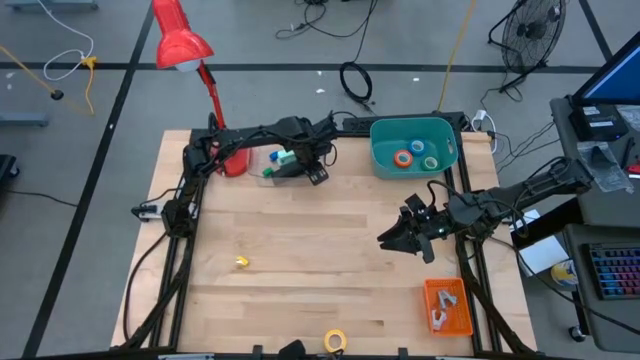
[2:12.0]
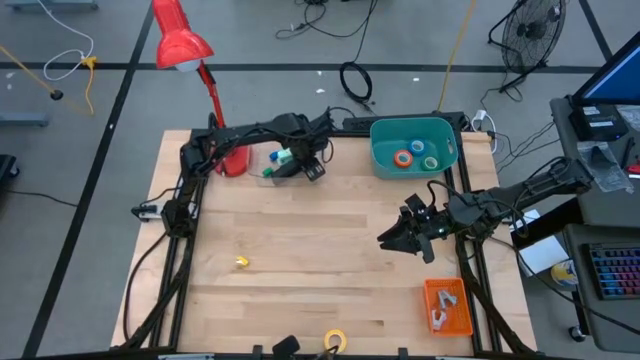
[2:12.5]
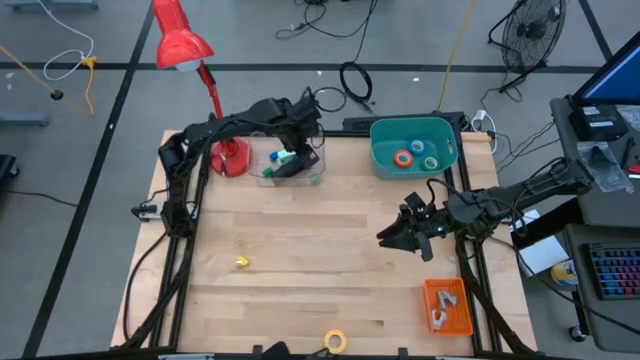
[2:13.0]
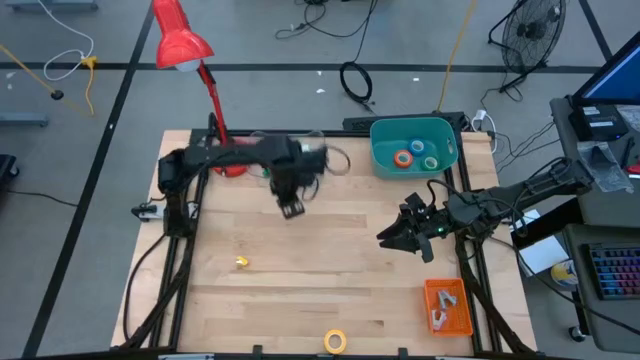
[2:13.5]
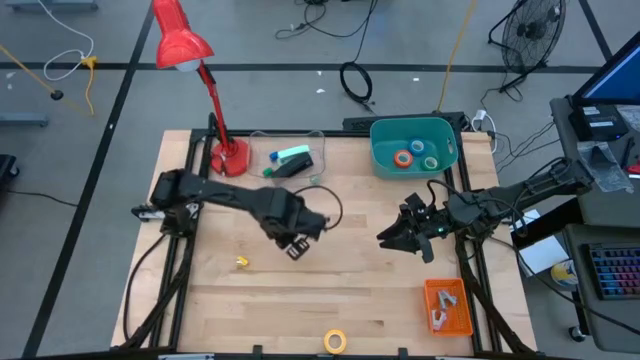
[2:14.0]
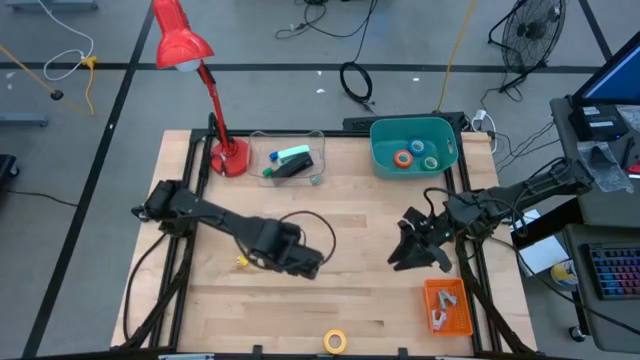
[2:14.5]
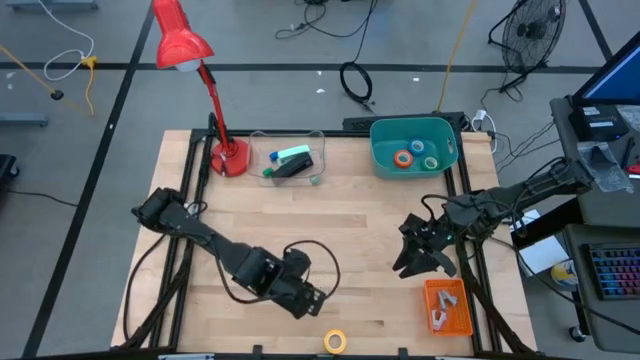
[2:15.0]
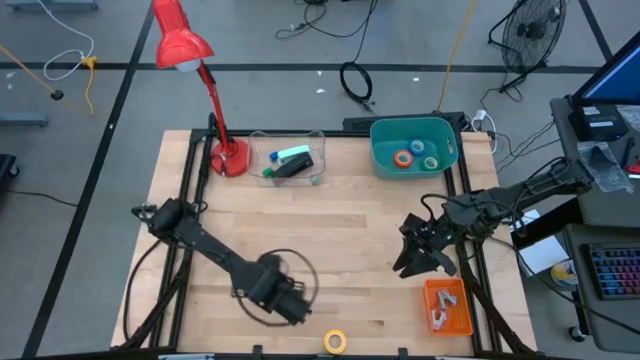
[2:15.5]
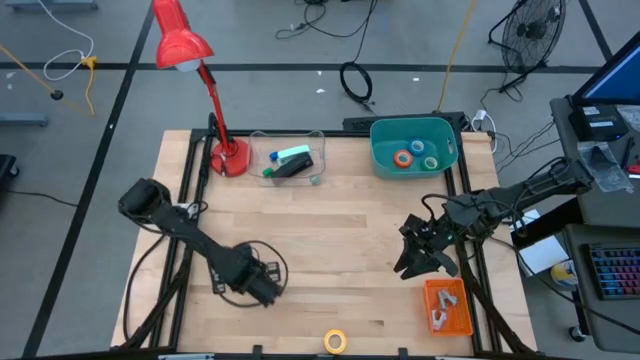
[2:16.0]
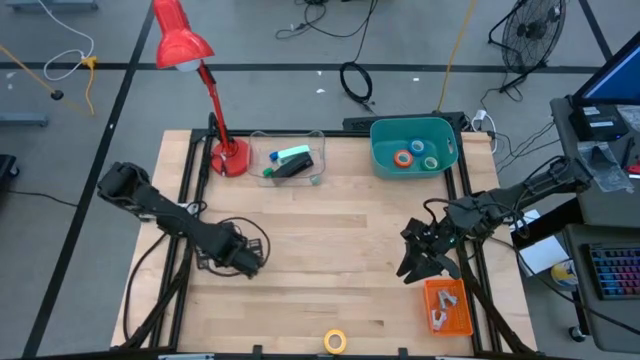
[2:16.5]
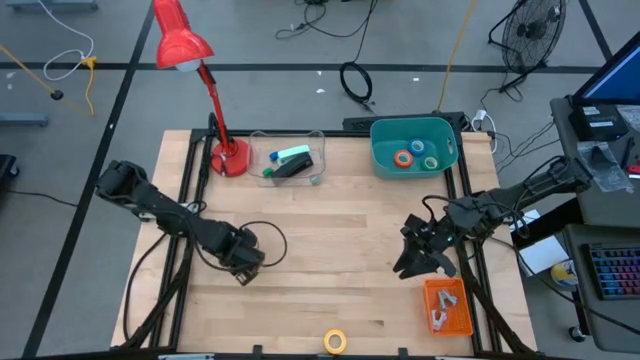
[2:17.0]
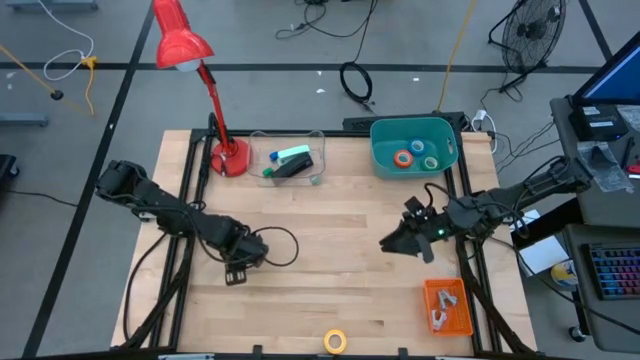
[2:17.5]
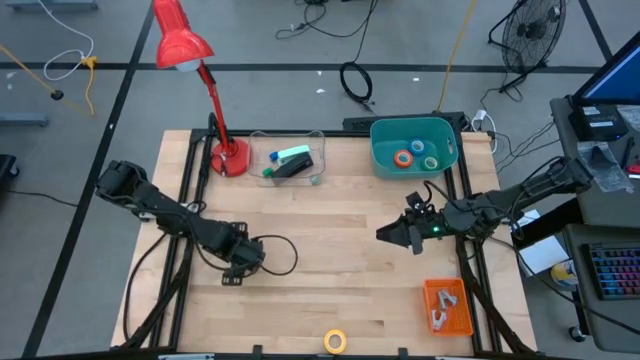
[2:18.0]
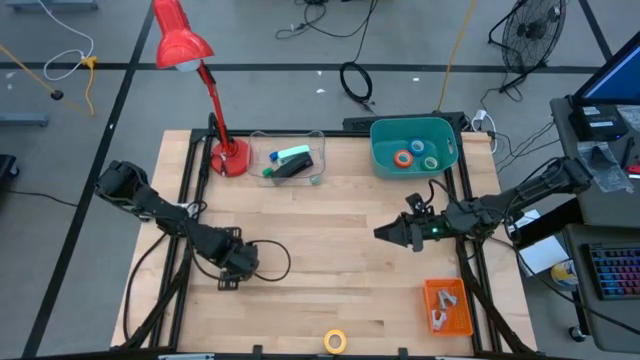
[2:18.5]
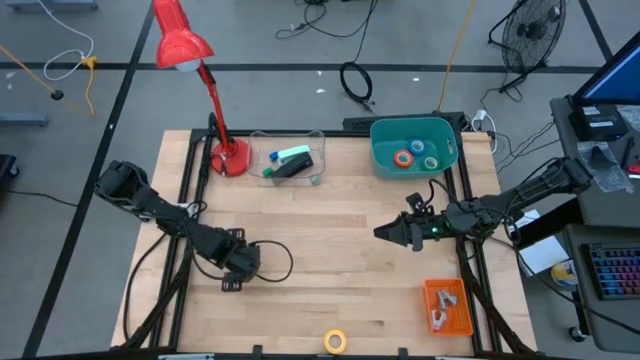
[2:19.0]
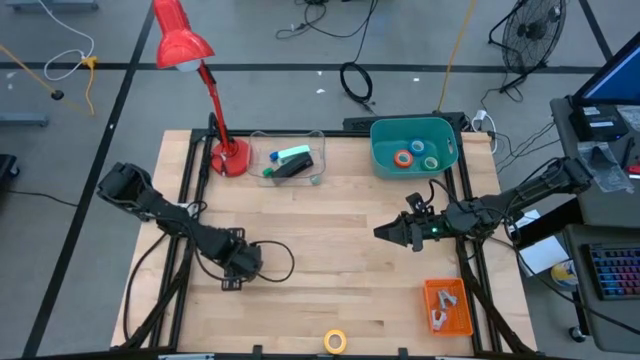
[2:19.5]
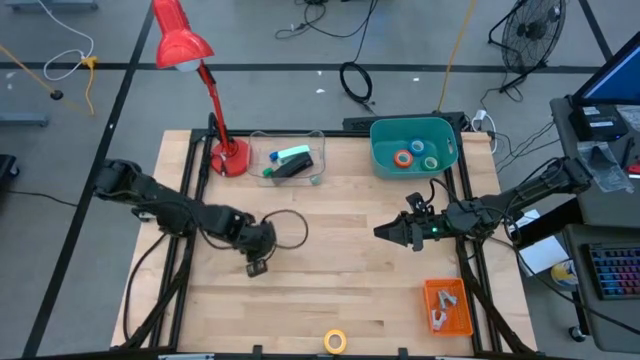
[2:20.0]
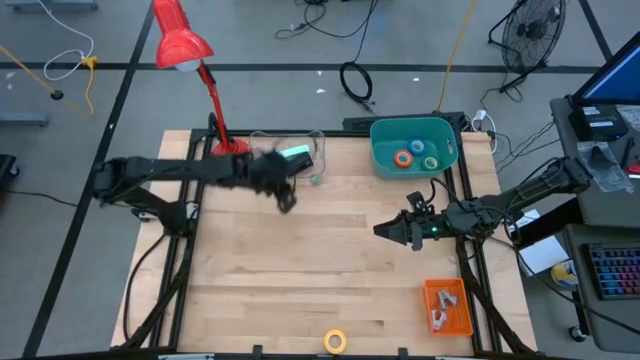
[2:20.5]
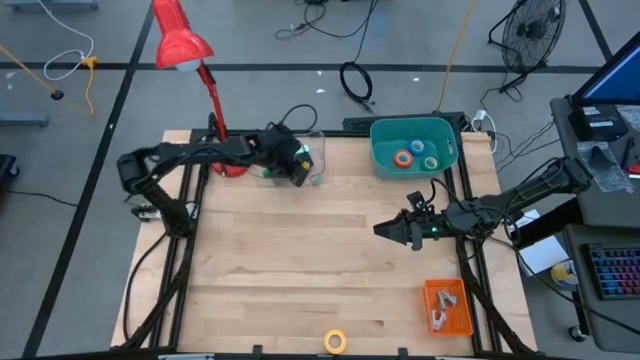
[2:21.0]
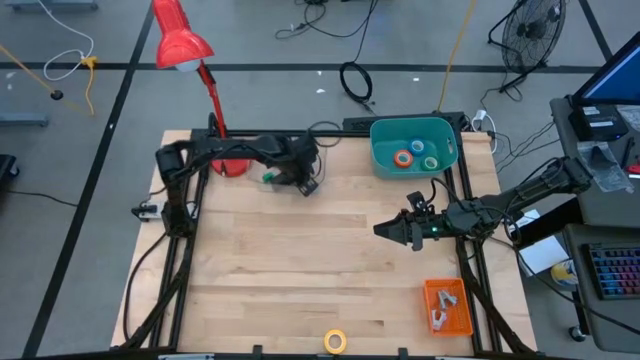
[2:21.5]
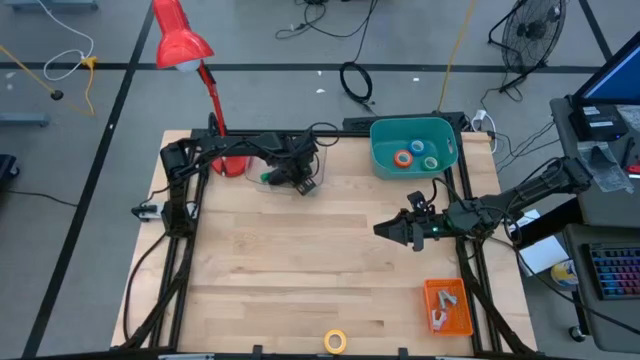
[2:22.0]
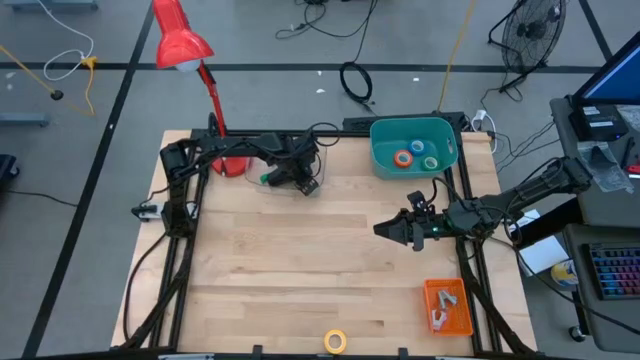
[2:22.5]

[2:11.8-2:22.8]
Task: Pick and place Stapler, Stapler remover, tape
Put the small yellow stapler into the transparent bin

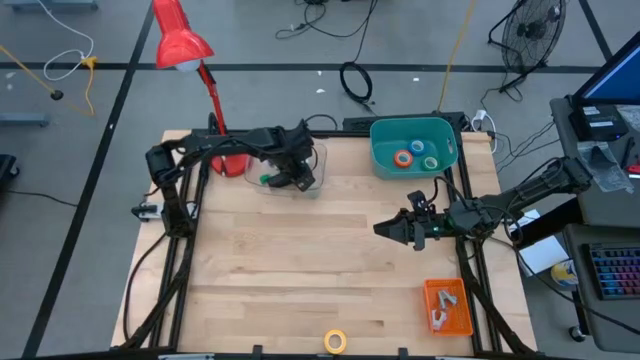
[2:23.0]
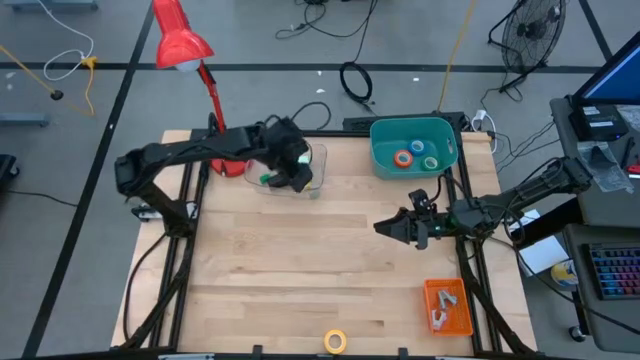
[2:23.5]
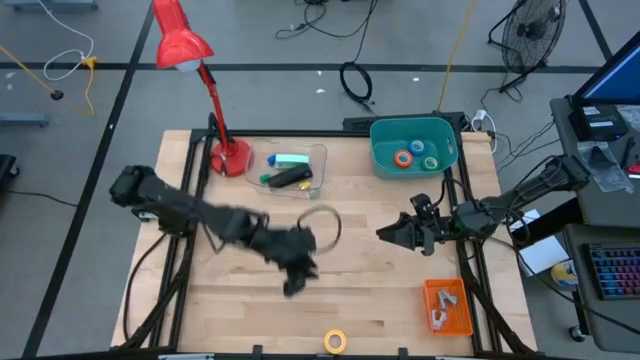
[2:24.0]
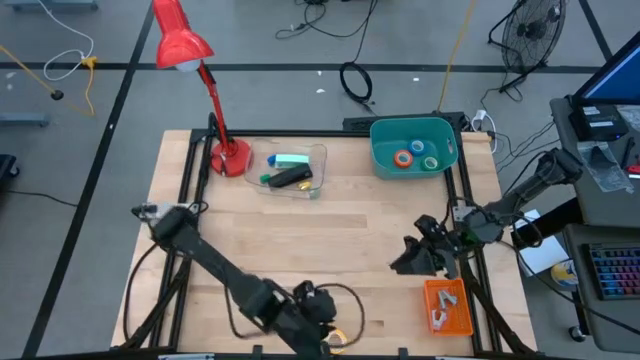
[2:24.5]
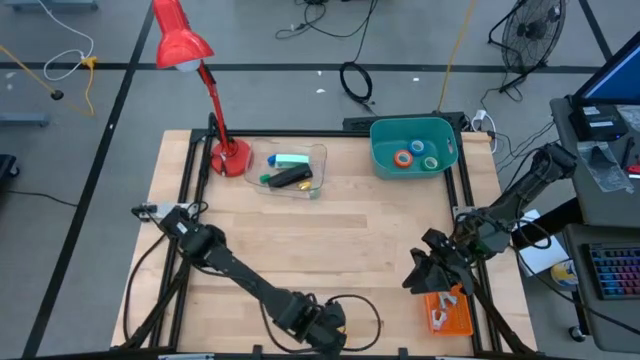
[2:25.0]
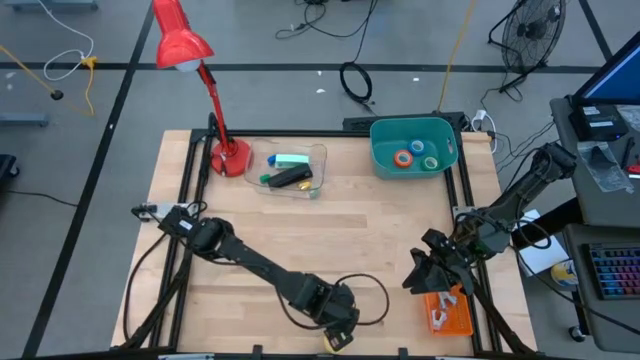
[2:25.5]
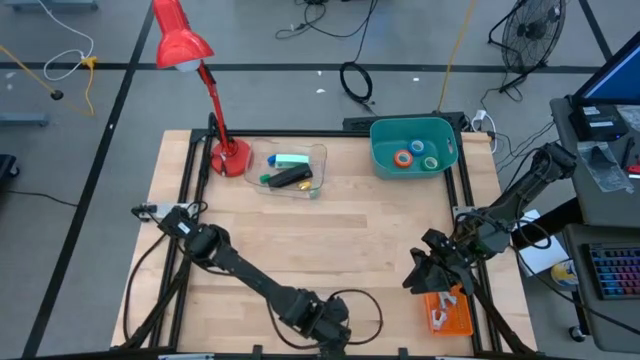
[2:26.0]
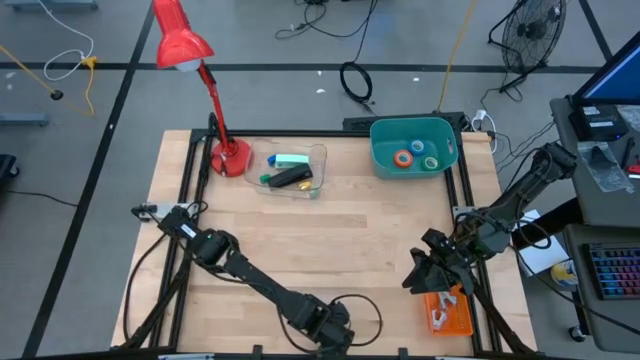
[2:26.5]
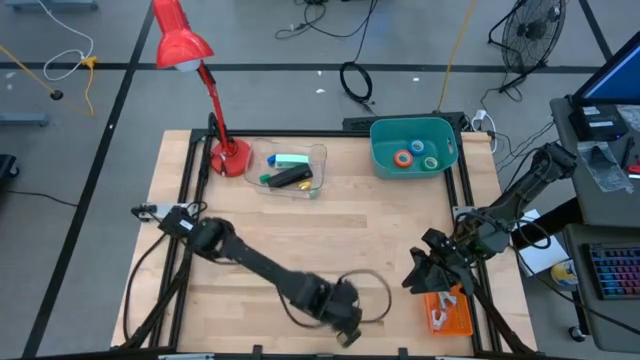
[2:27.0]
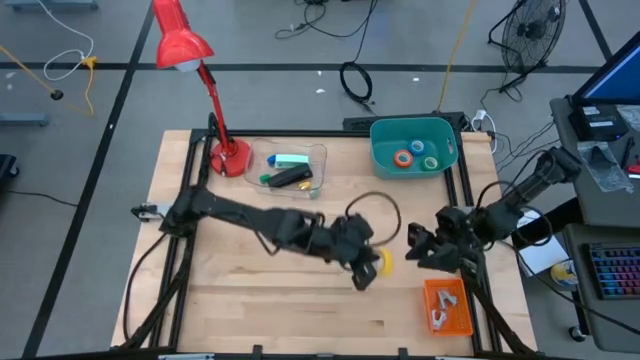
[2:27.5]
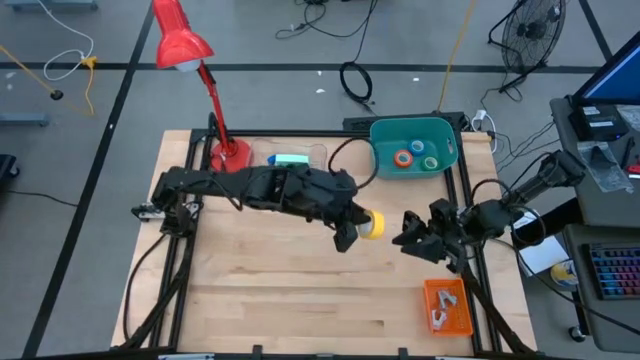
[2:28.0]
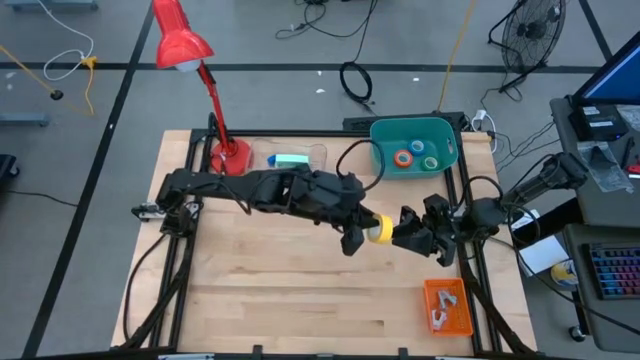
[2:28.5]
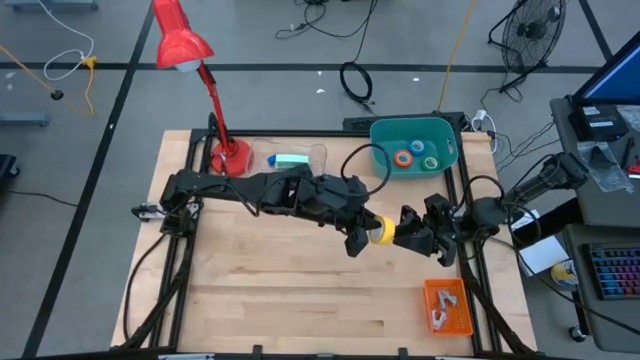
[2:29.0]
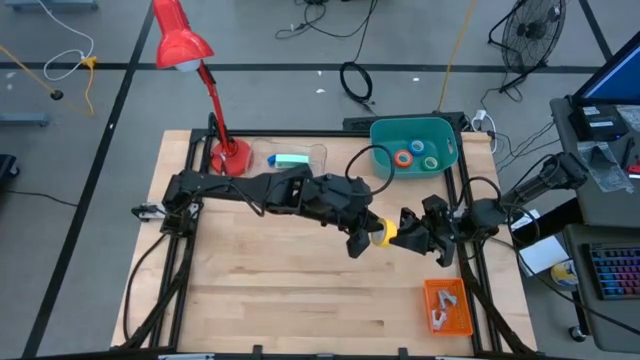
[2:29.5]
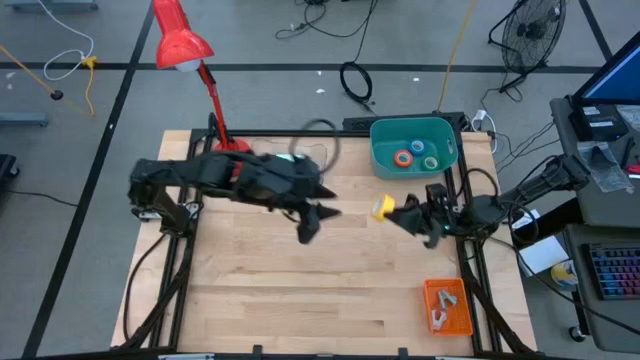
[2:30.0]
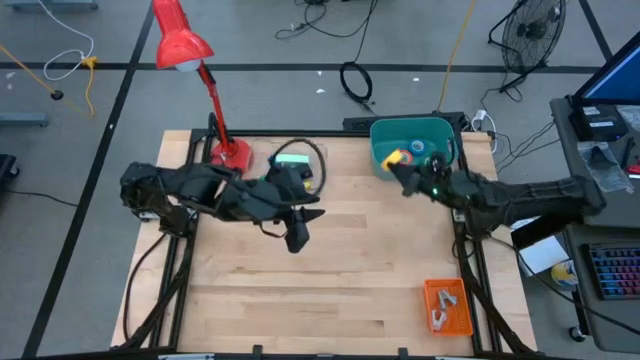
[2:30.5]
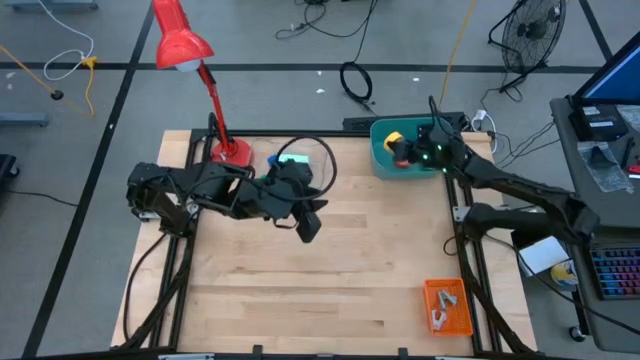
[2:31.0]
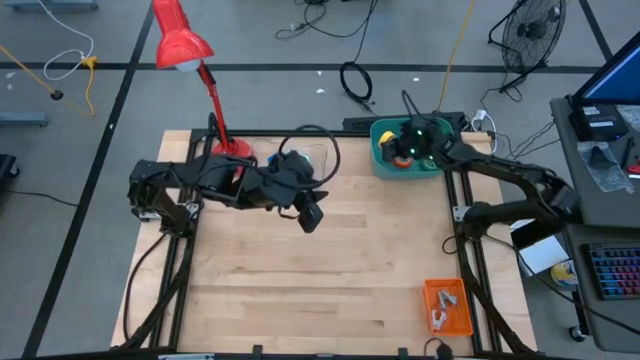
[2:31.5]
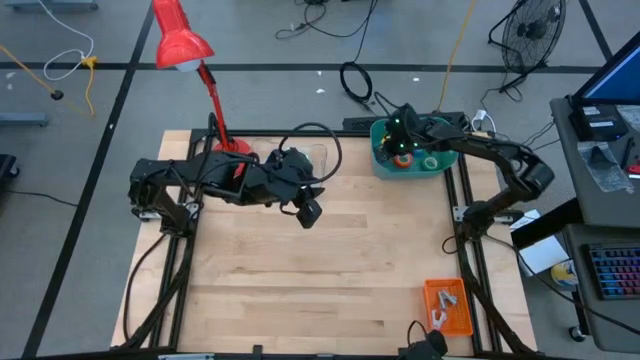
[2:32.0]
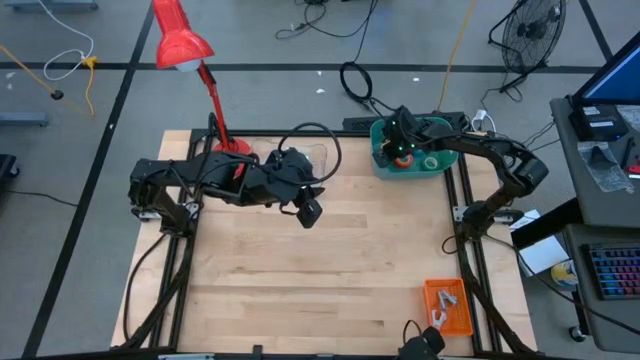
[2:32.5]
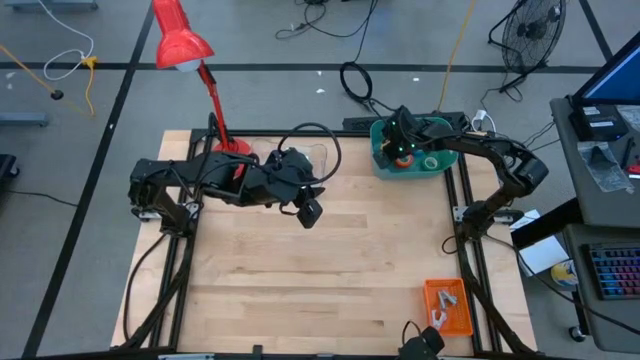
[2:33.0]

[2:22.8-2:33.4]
Put the small yellow tape into the blue bin
